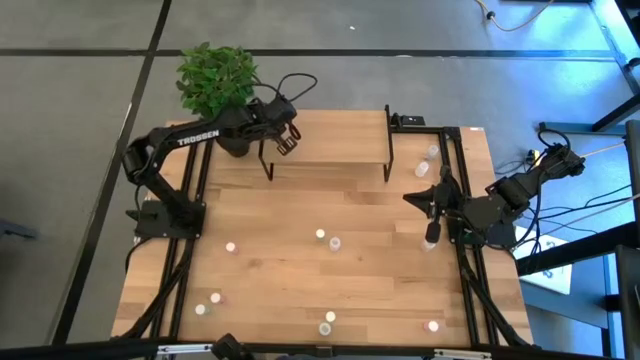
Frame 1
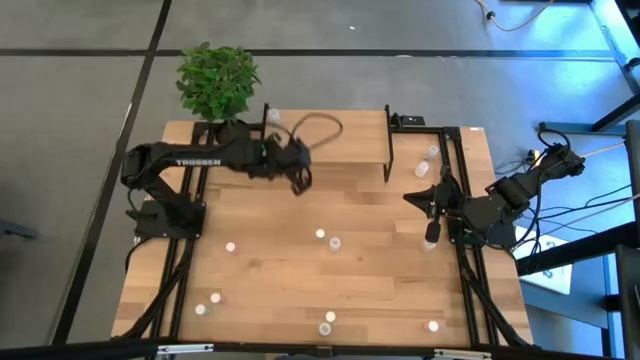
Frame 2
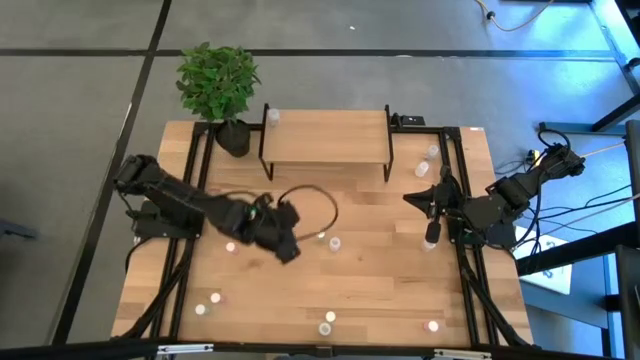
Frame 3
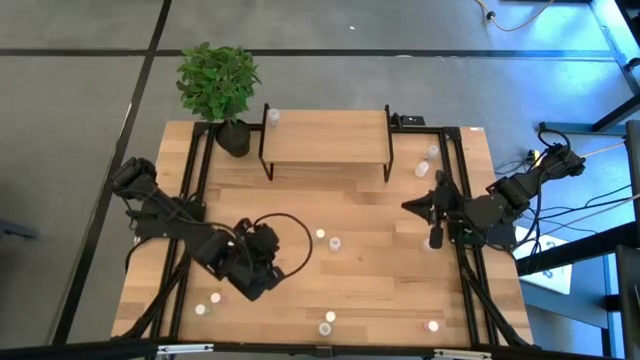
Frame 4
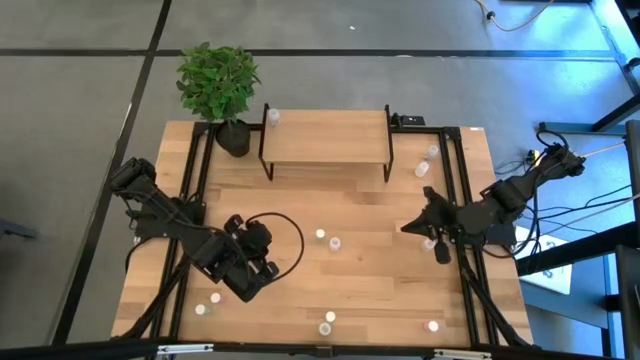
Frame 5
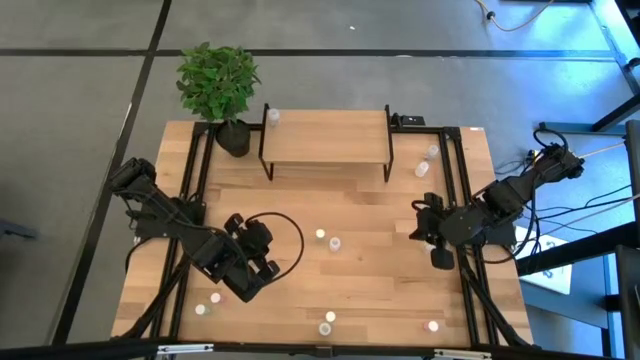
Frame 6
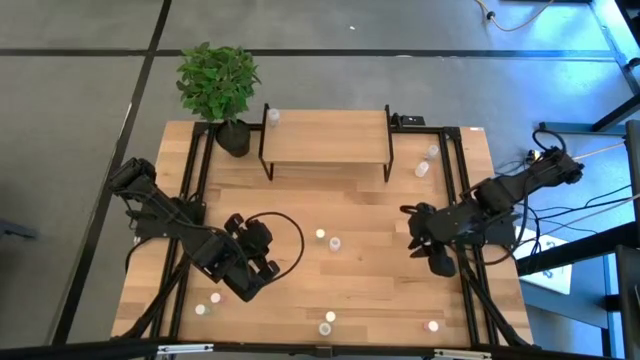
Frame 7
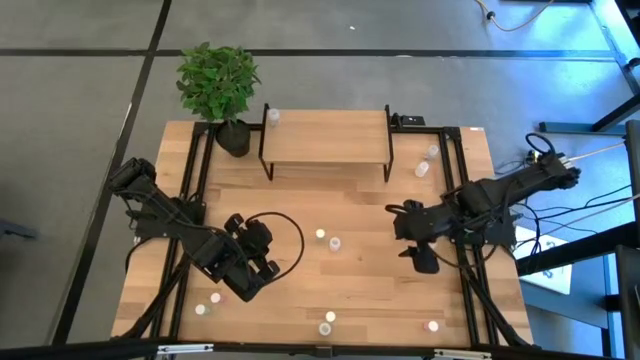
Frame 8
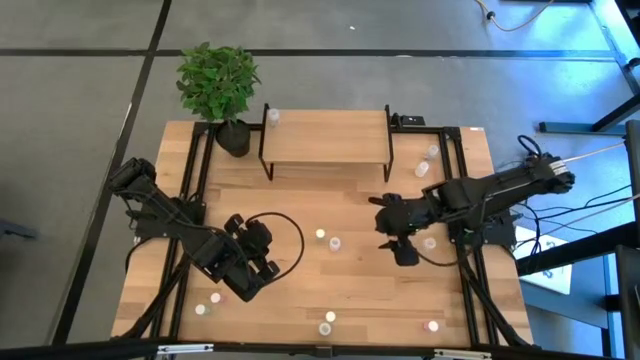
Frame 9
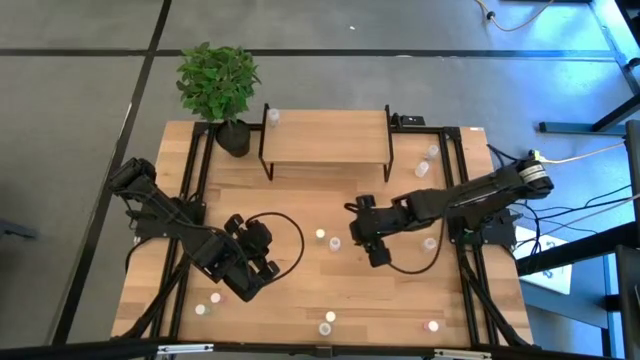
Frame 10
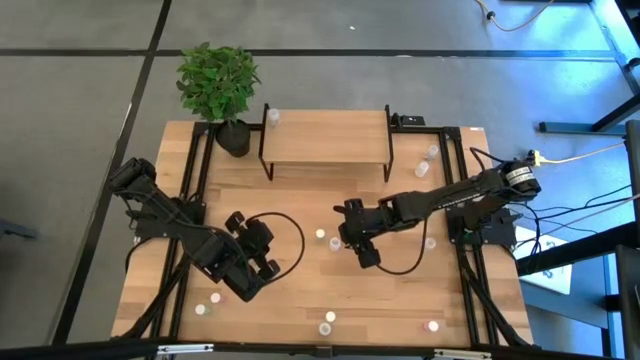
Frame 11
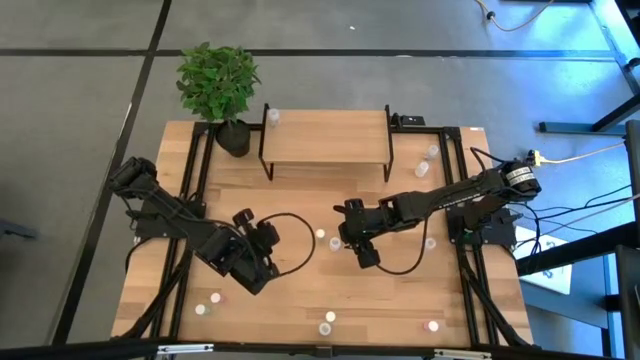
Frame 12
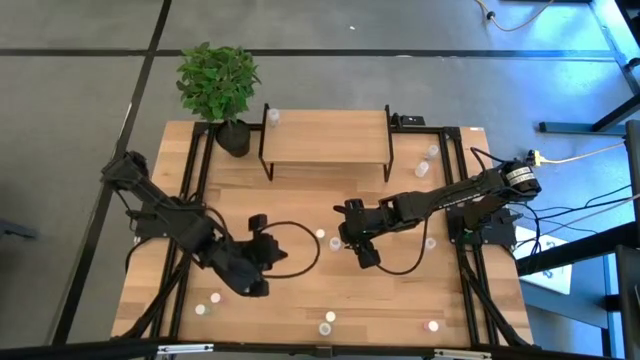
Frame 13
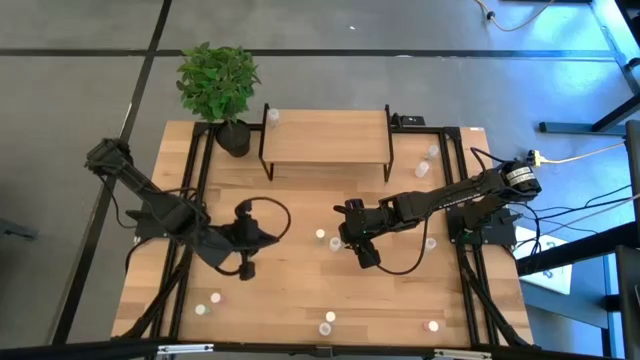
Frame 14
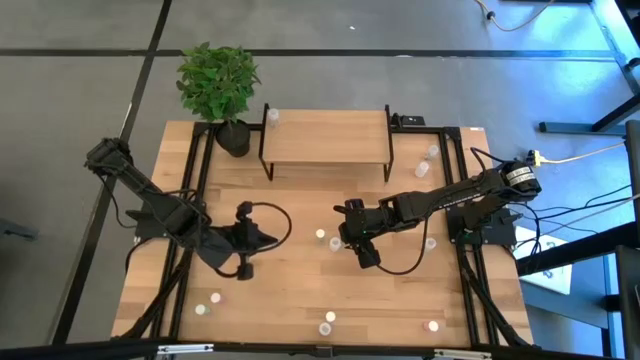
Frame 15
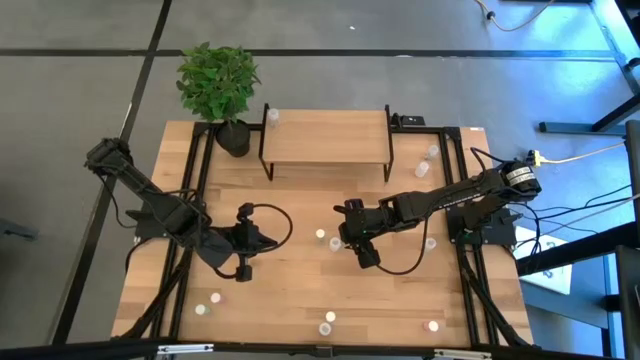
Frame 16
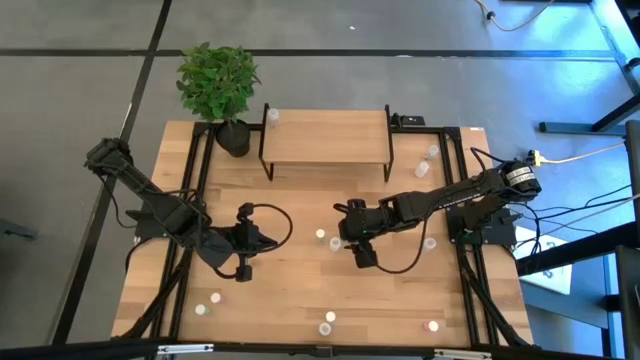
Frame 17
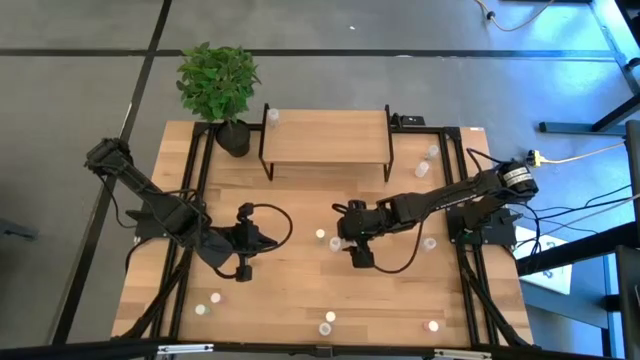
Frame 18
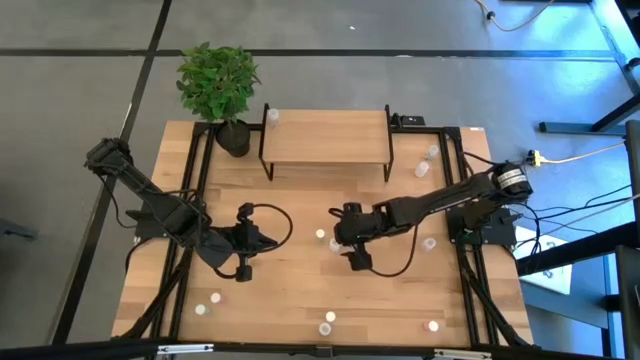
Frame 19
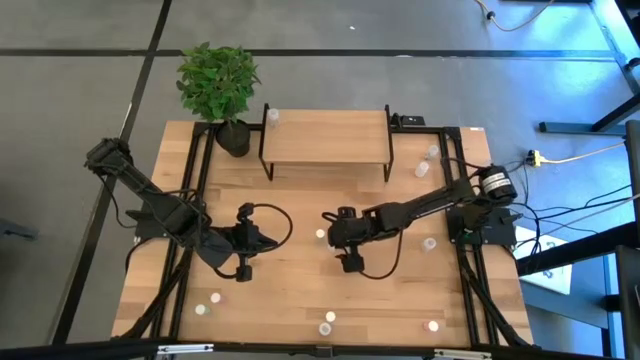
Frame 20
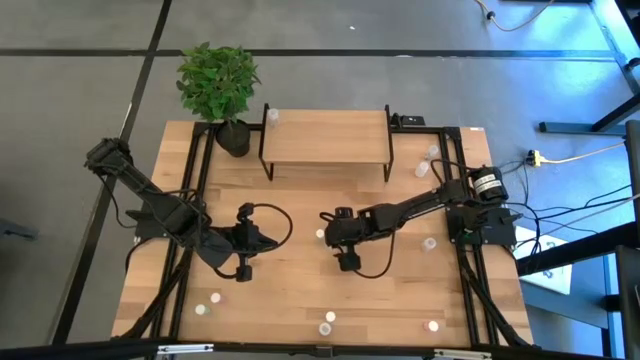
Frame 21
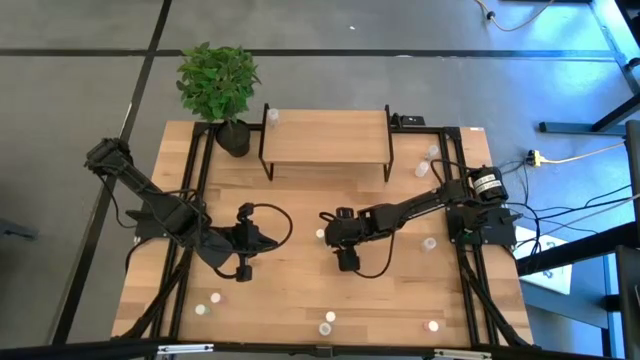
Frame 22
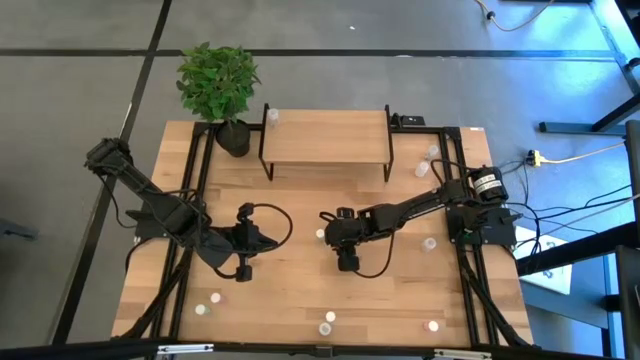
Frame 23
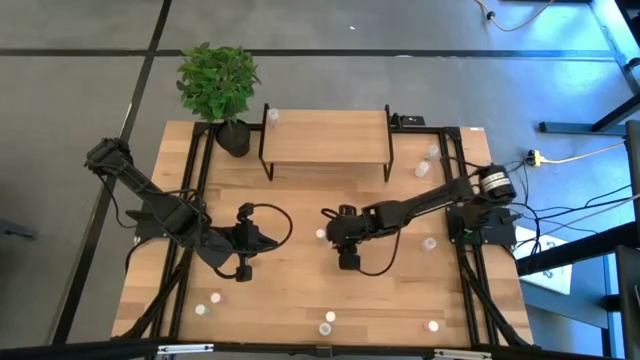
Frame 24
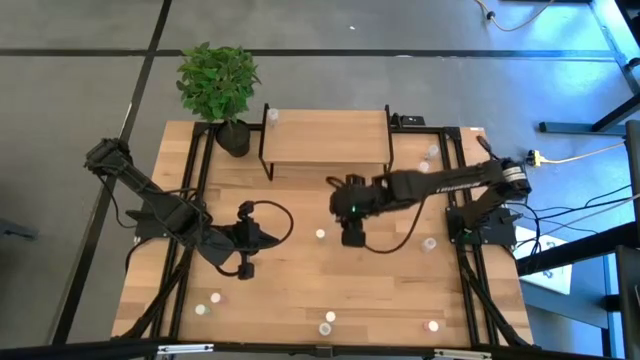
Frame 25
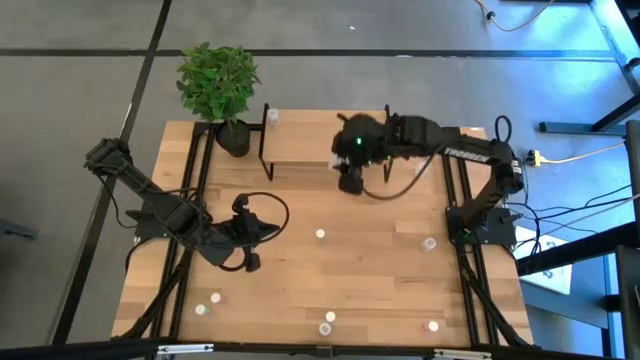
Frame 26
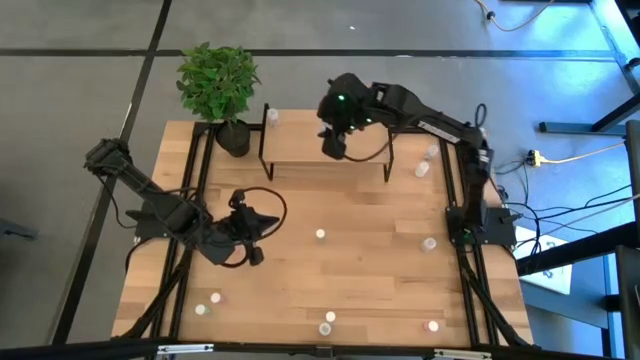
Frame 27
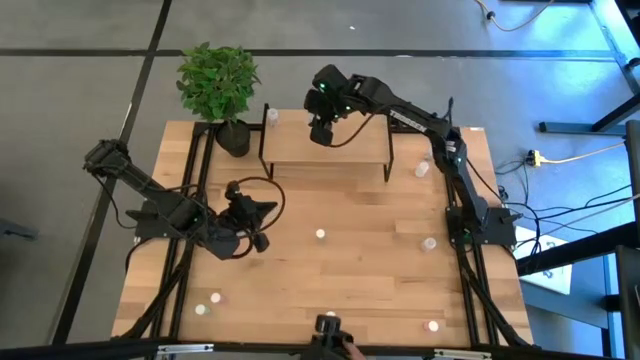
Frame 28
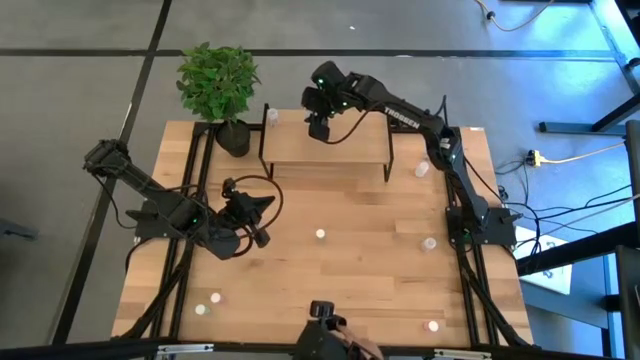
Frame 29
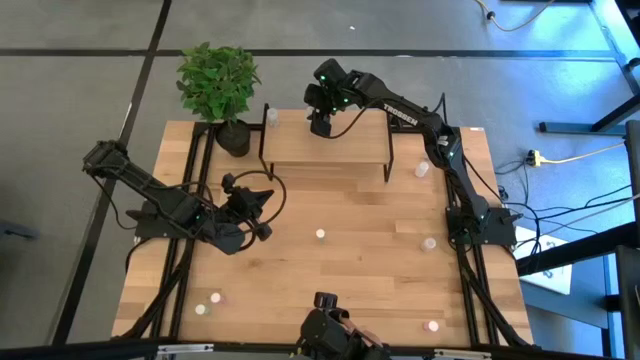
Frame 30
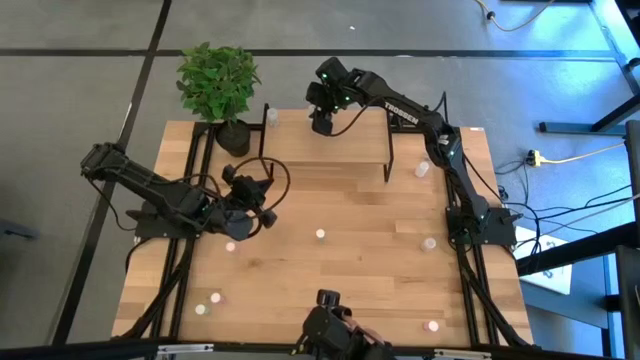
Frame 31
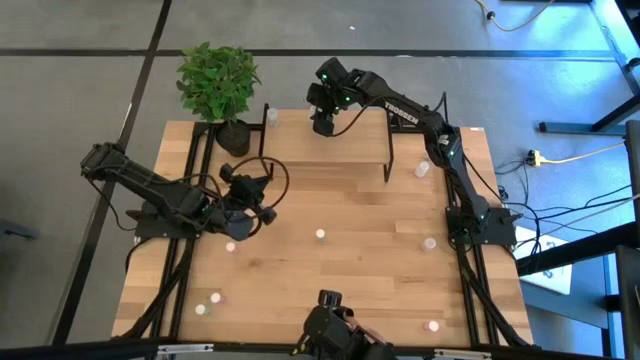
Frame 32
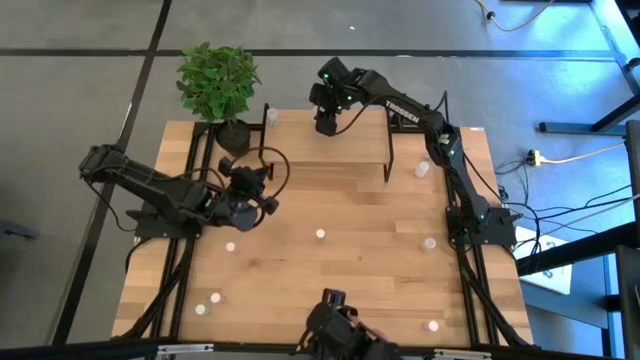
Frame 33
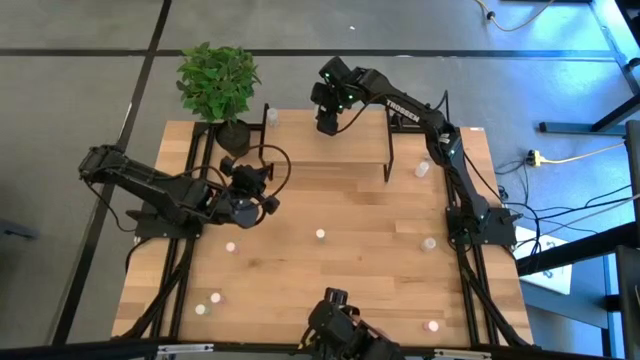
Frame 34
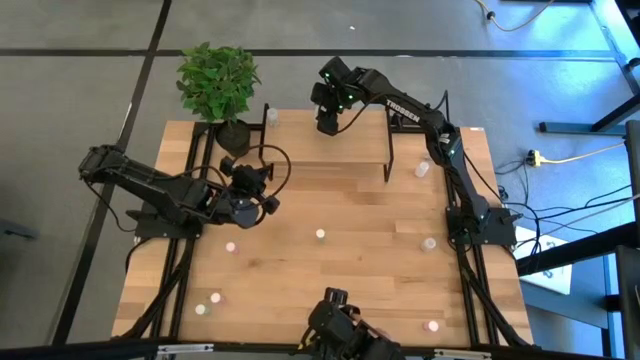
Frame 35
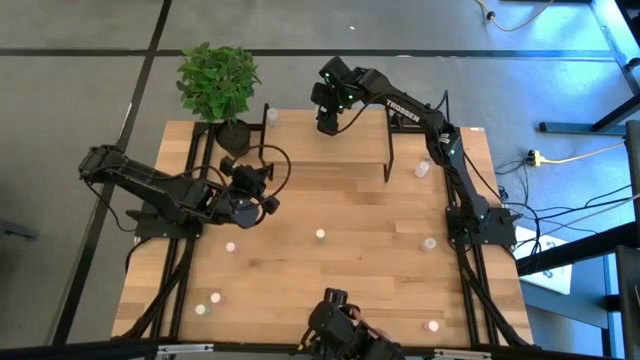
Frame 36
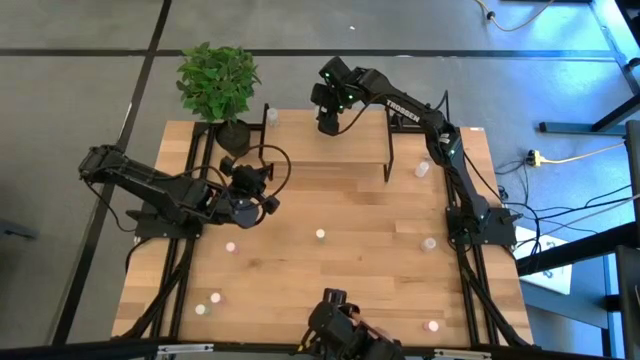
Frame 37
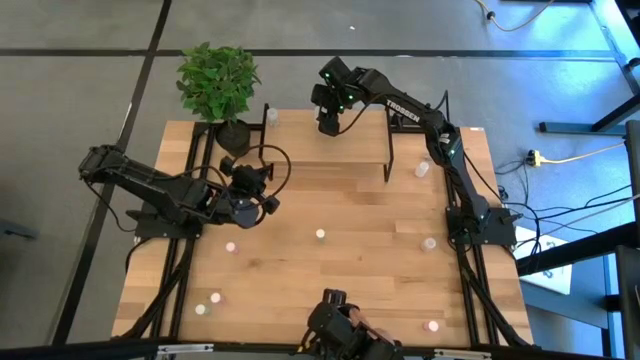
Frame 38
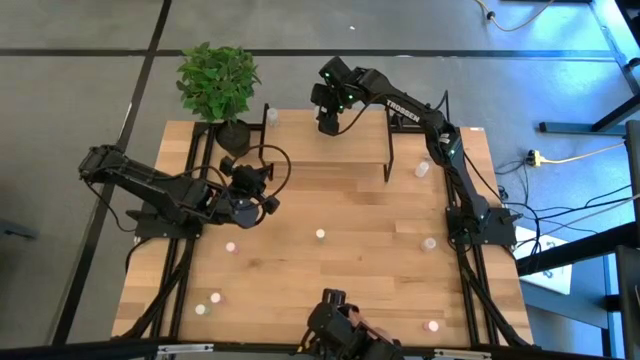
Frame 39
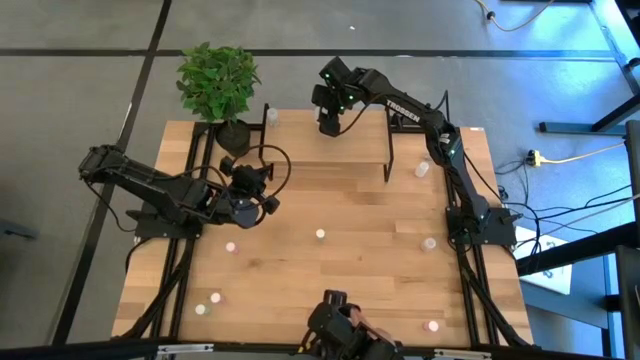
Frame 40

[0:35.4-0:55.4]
Task: Pick and place medicine bottles onto shelf by color
Put the center white pill bottle on the shelf
